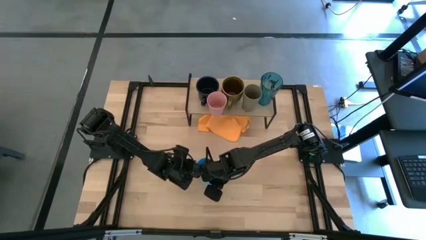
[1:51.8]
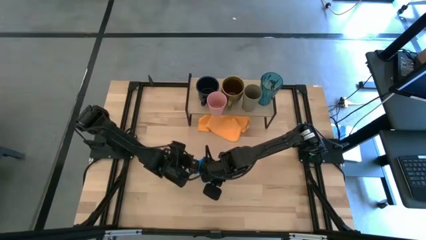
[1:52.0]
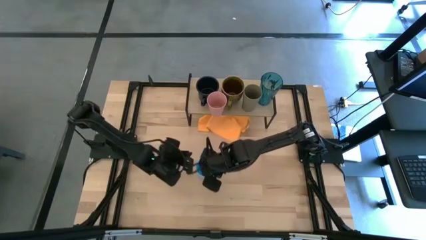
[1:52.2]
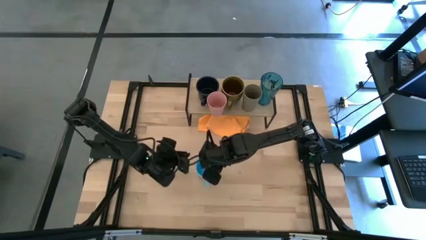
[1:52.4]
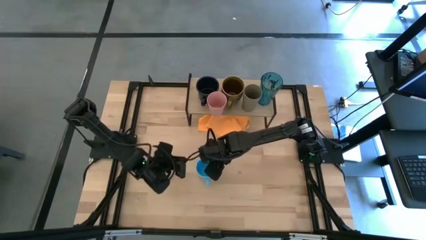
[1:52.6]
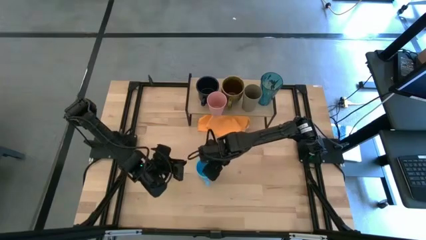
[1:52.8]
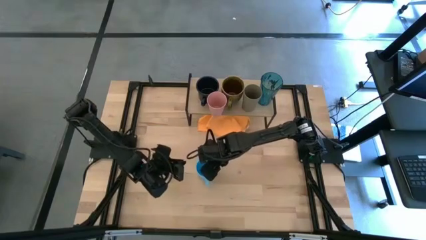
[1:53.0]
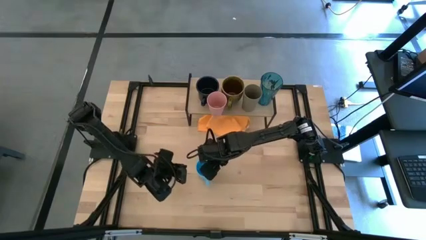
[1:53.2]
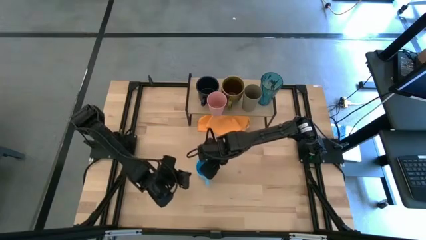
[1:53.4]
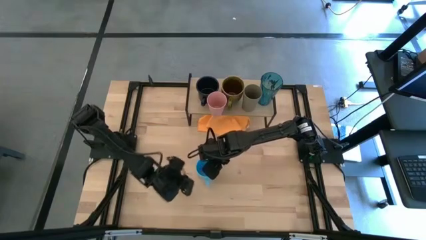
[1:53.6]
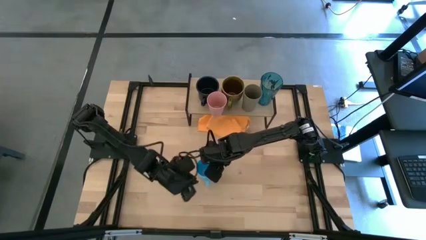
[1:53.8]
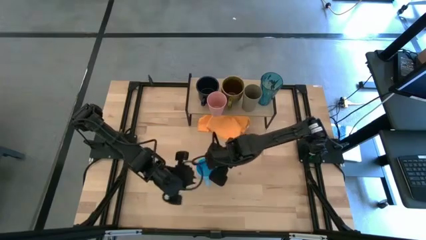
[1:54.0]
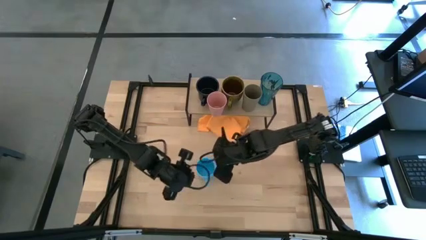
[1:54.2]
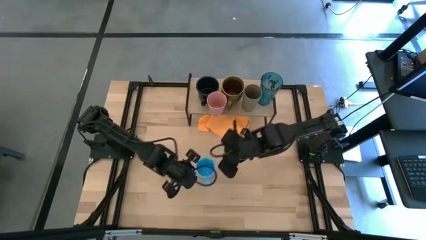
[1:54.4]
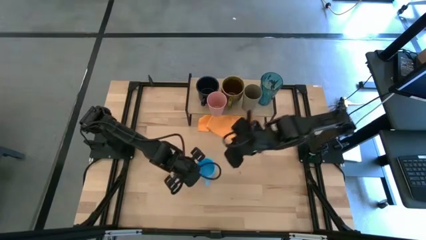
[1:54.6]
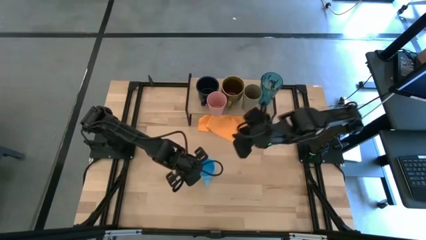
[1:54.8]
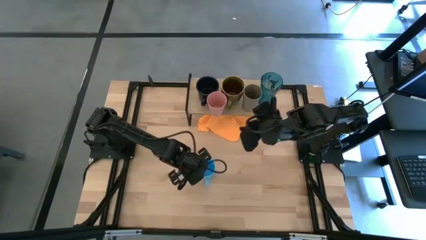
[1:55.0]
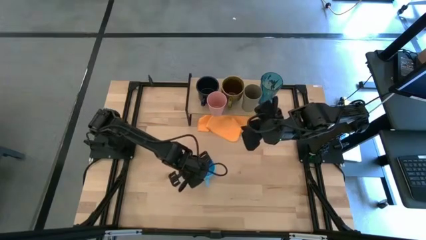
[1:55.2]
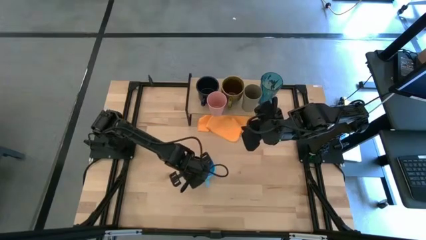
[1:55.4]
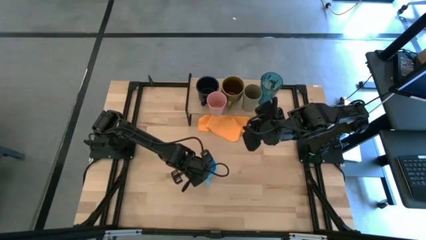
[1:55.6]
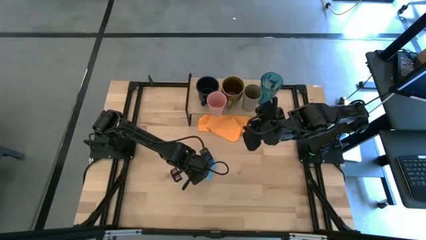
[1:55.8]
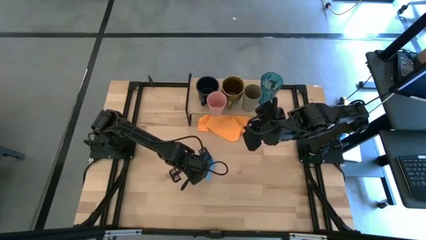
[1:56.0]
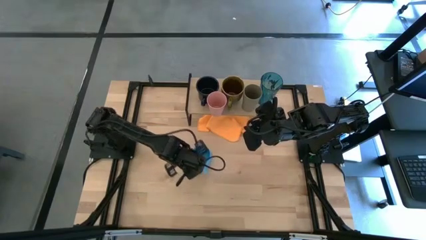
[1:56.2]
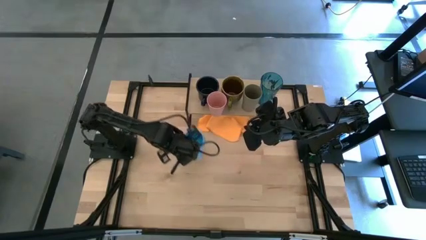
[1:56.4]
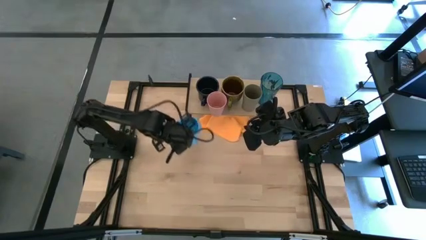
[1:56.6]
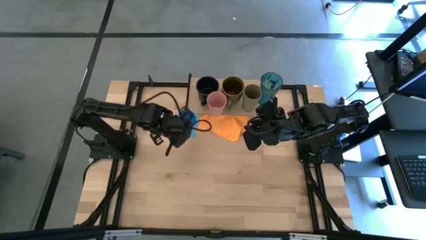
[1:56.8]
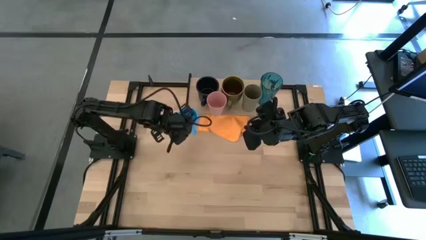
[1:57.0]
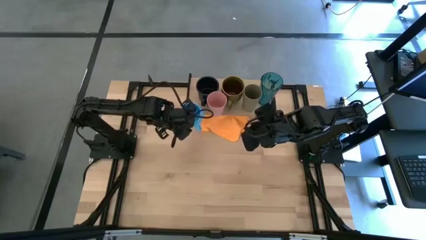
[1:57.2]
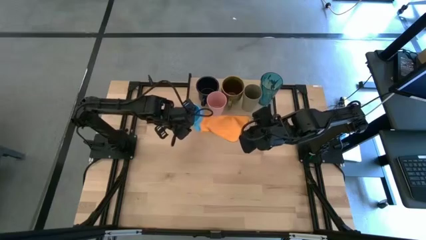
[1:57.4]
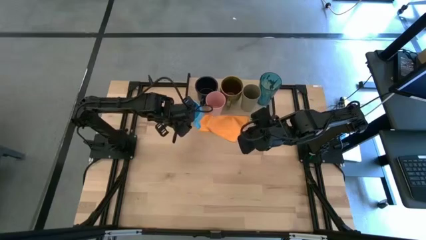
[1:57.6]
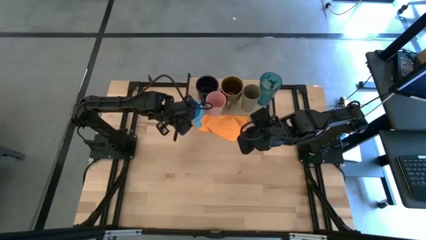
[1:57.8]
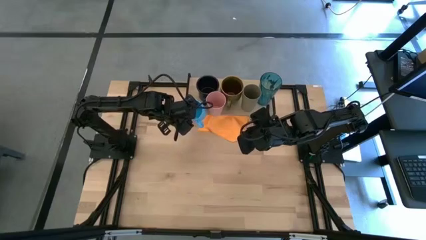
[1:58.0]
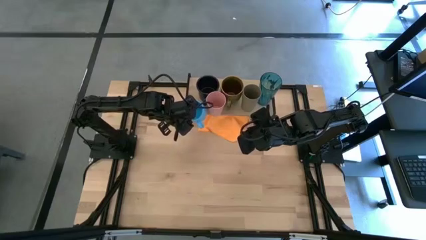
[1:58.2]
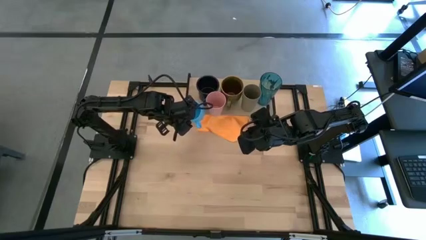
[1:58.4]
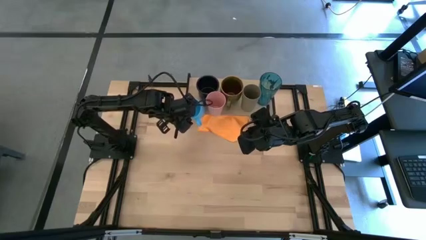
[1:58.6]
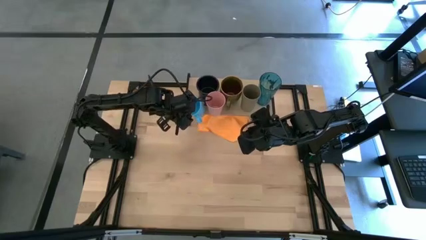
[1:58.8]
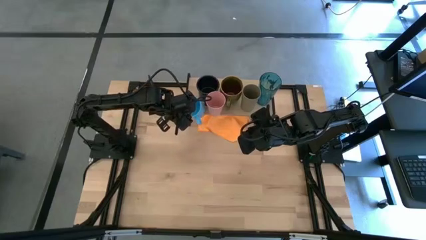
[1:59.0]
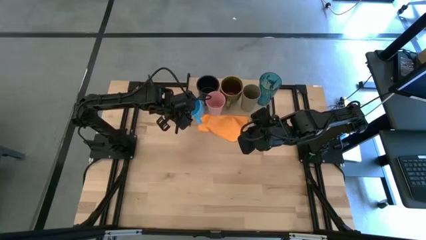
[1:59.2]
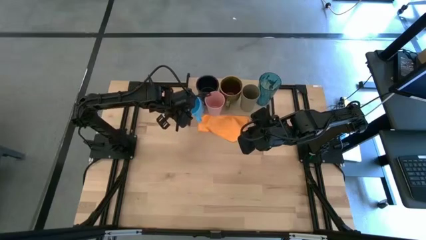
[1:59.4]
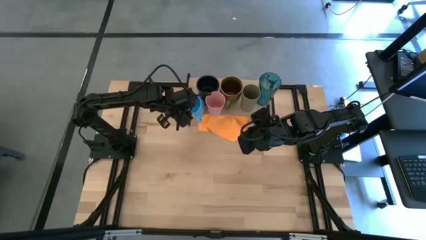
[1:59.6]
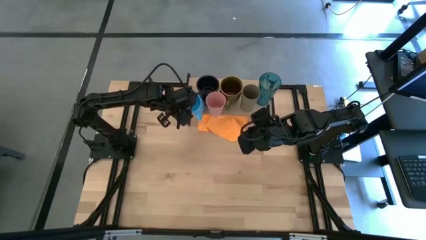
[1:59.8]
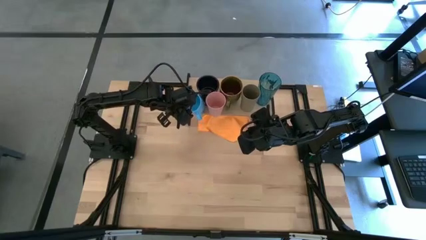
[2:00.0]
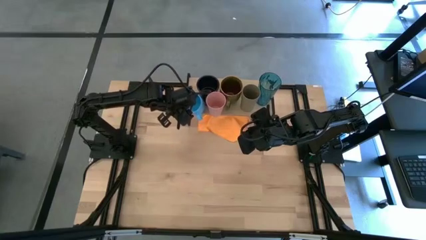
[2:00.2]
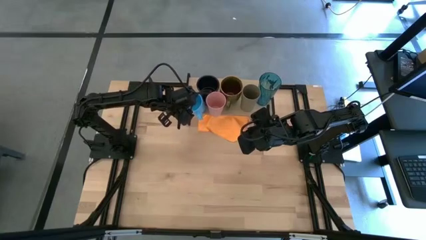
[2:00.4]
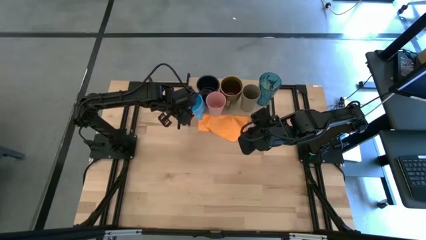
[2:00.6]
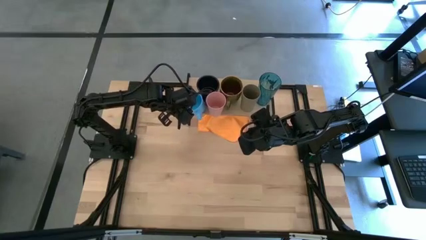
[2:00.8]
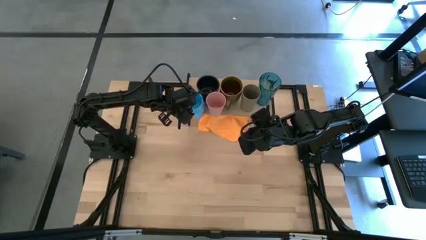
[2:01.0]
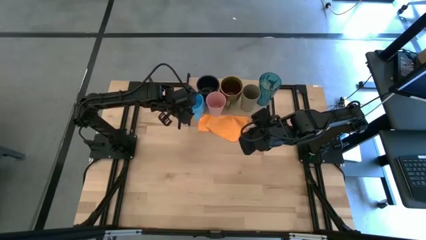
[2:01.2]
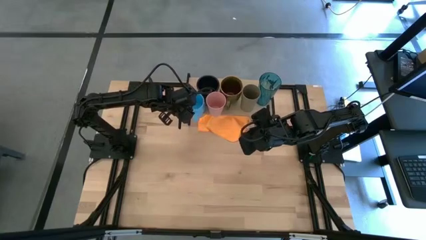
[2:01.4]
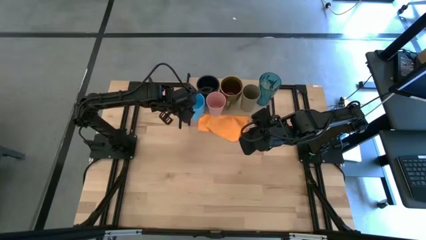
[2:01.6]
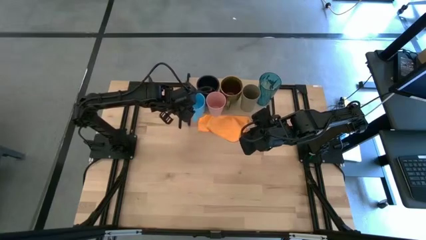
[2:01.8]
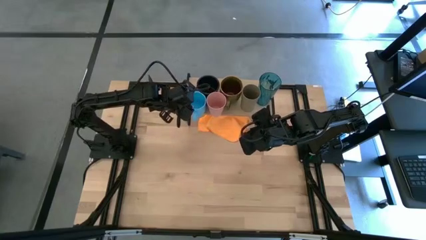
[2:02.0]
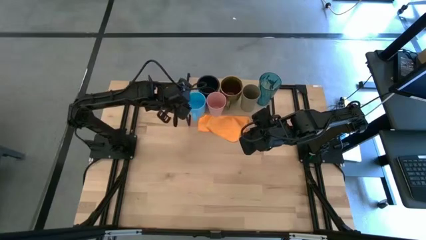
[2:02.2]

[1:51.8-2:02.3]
Task: Stack small to large cups/mugs on shelf
Put the blue mug on the shelf

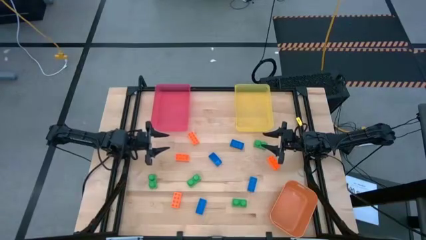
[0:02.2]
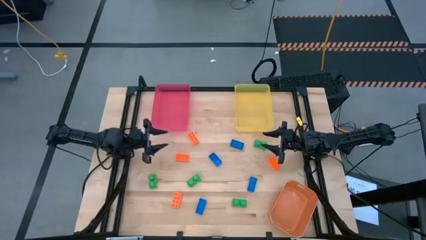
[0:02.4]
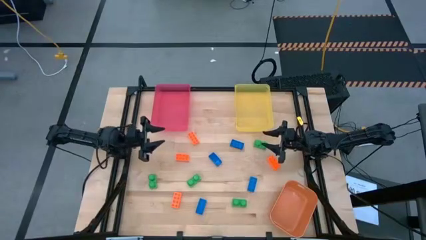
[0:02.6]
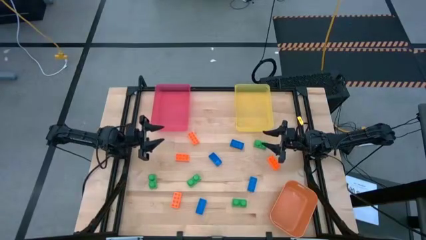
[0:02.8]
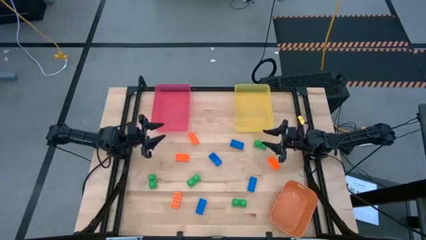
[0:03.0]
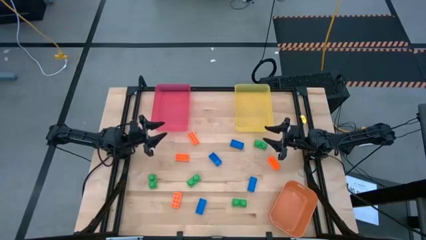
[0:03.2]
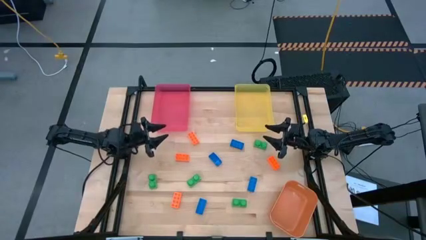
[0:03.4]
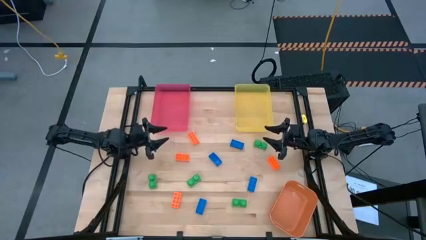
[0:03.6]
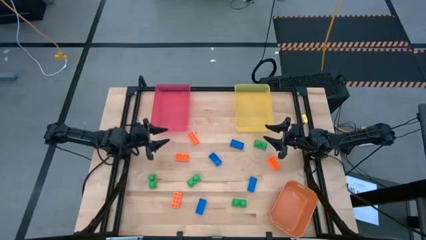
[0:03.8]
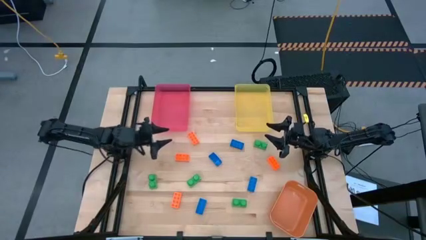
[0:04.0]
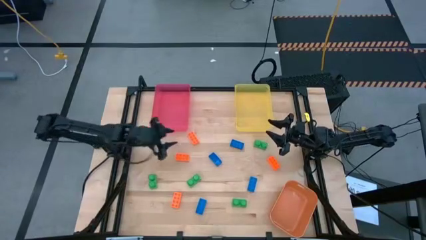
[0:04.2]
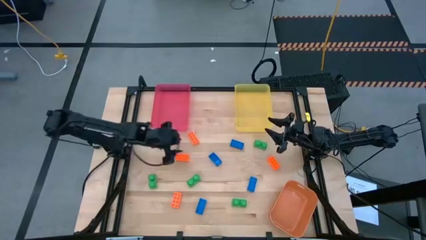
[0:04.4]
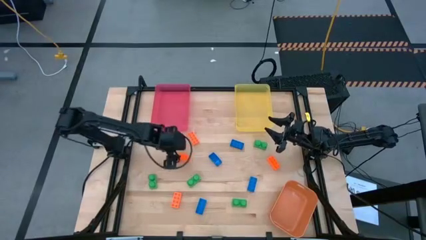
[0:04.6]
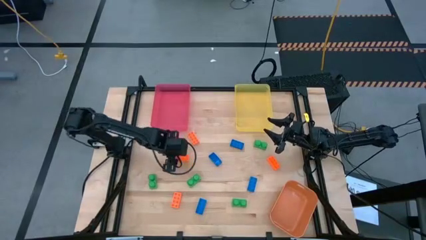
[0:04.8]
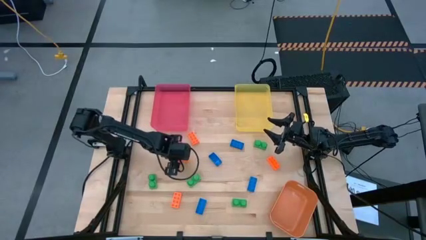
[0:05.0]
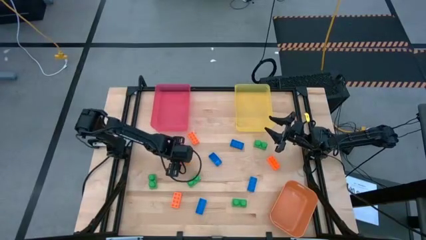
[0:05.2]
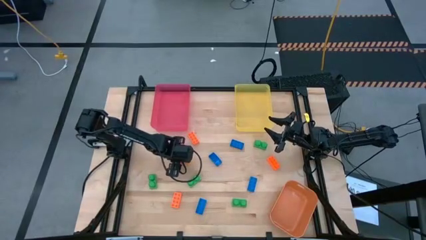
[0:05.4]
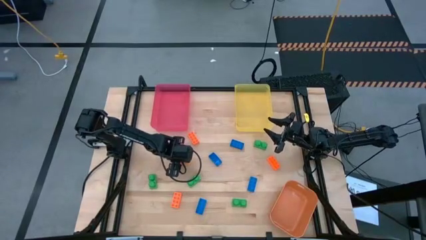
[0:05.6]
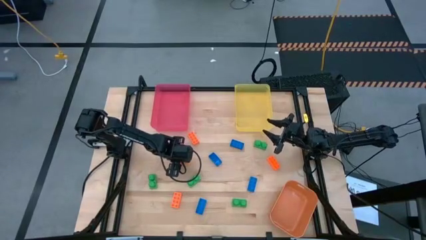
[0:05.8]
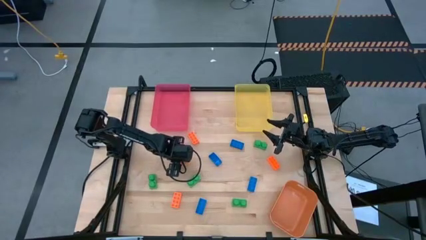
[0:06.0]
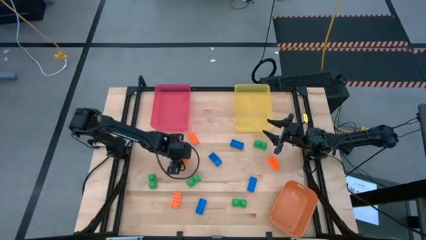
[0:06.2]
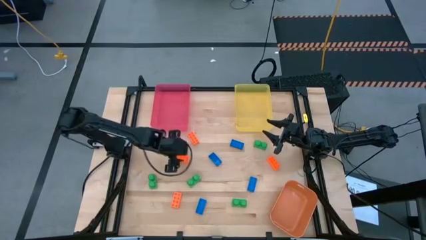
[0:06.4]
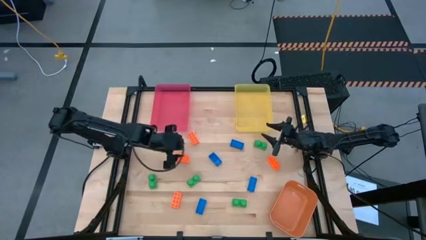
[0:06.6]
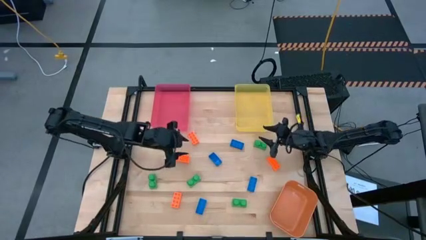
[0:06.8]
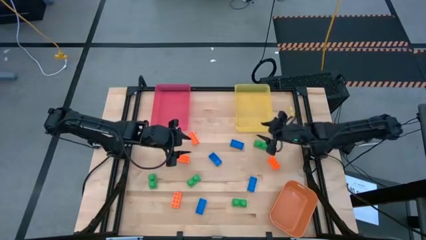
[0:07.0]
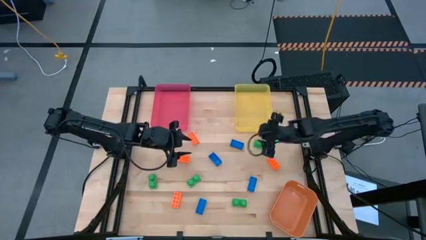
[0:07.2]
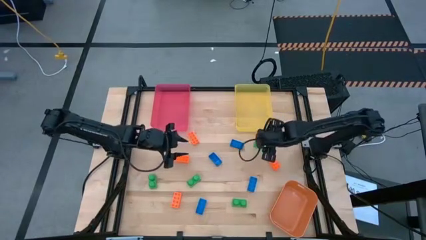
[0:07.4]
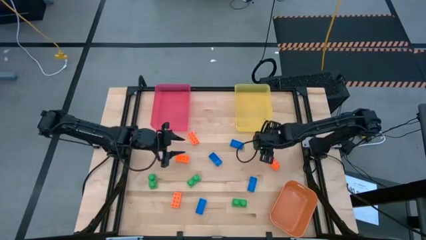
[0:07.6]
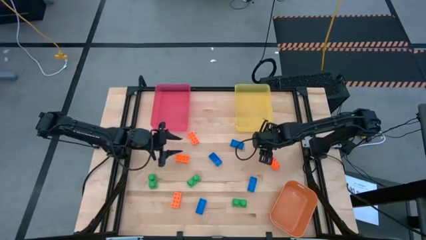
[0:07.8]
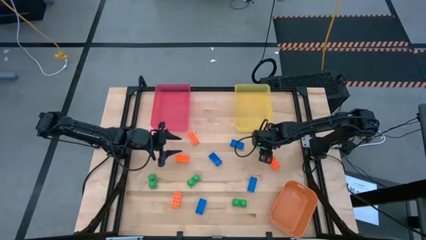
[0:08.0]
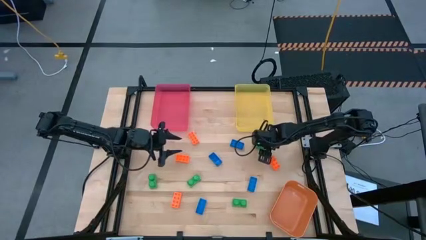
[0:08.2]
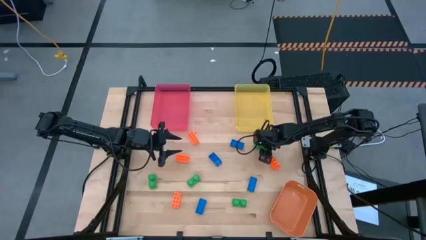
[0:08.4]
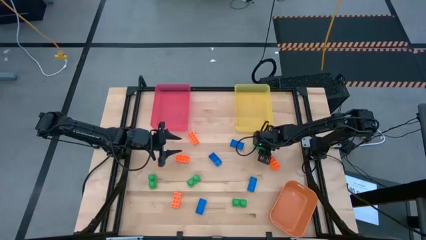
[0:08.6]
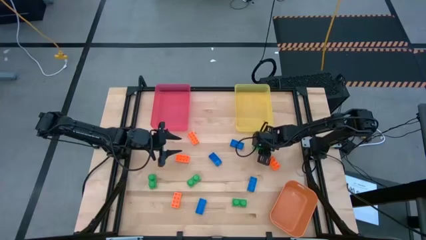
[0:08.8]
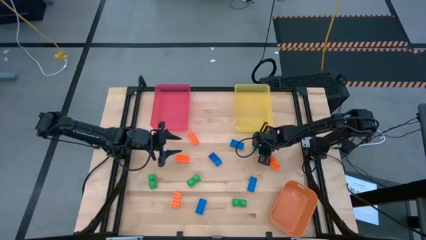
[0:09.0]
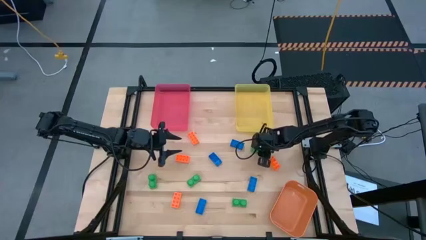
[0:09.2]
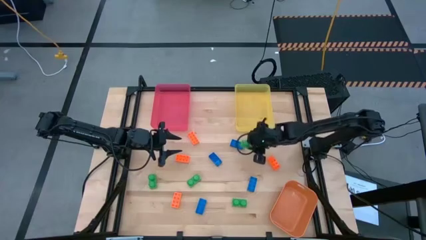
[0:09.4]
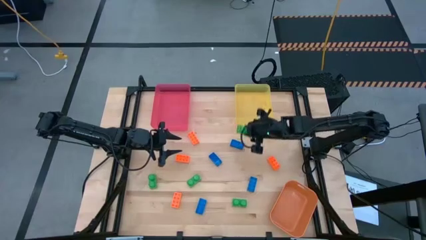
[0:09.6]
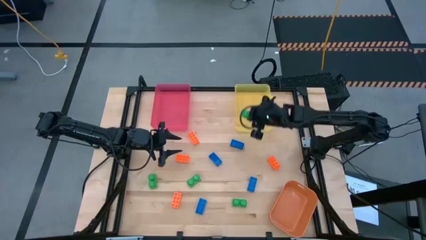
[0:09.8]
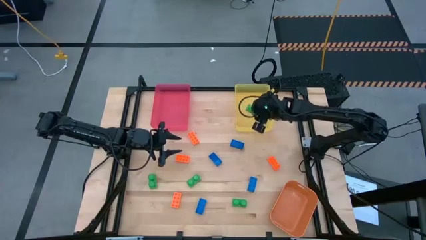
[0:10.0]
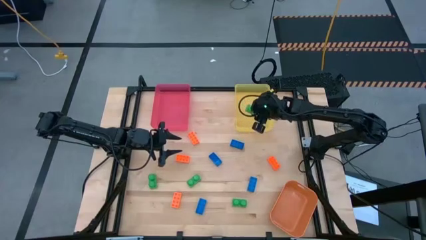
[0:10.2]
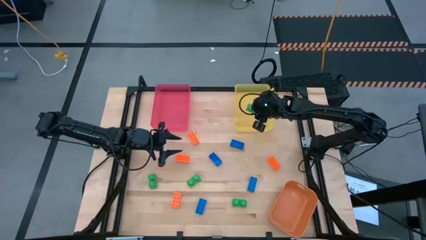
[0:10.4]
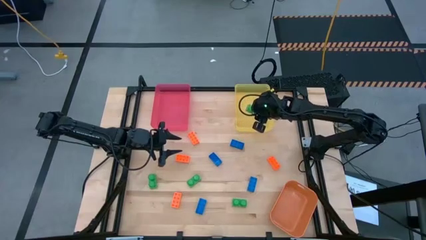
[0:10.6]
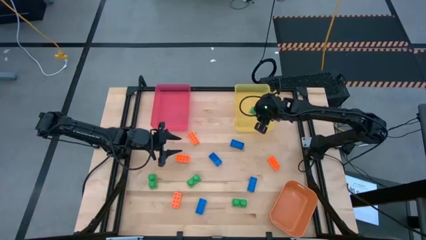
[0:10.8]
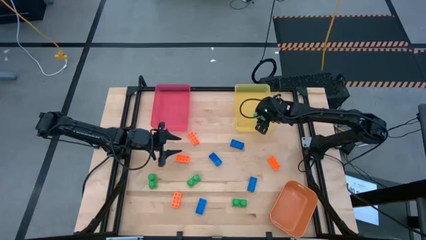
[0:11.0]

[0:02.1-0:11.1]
Task: Sort & place blocks by color
Put the top right green game piece into the yellow bin
